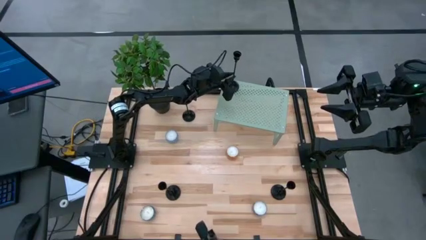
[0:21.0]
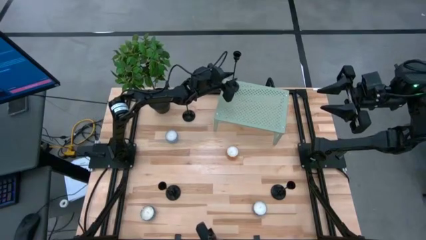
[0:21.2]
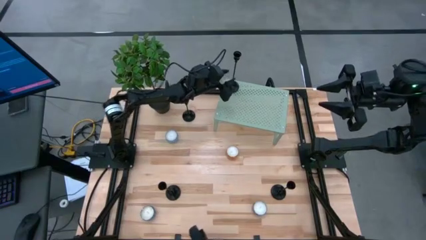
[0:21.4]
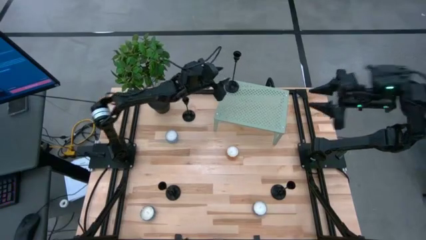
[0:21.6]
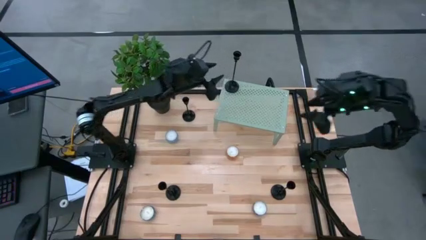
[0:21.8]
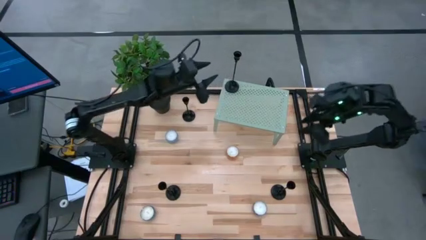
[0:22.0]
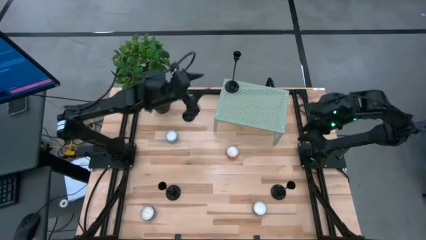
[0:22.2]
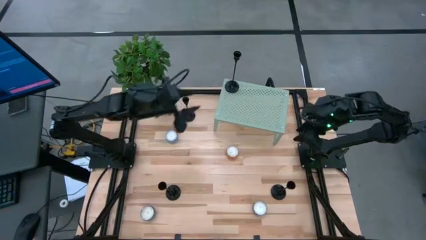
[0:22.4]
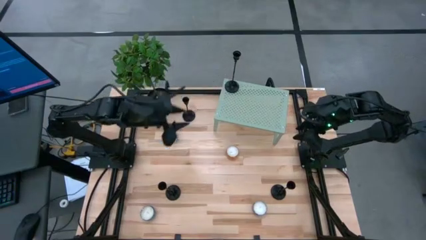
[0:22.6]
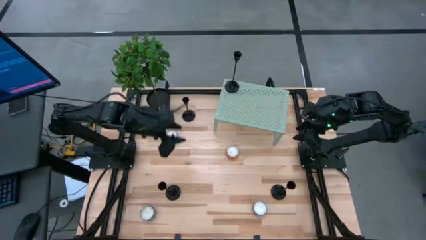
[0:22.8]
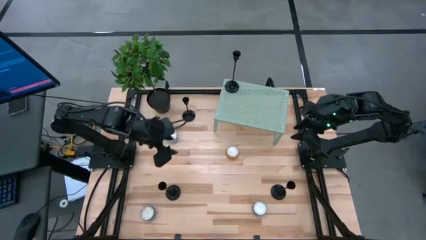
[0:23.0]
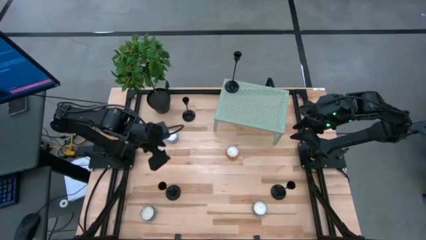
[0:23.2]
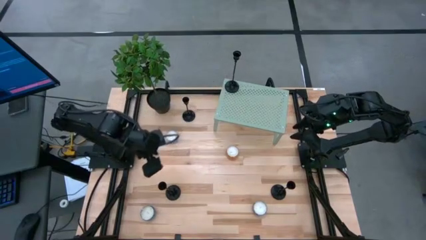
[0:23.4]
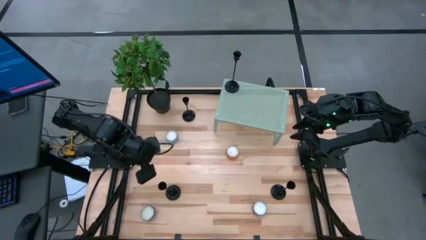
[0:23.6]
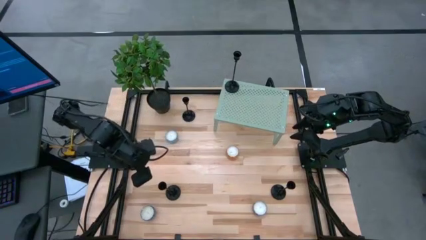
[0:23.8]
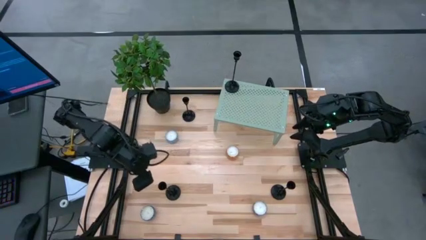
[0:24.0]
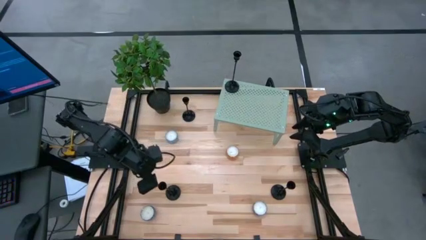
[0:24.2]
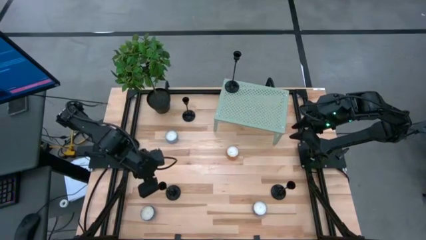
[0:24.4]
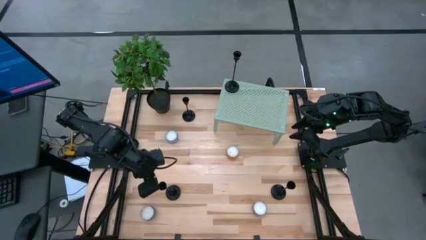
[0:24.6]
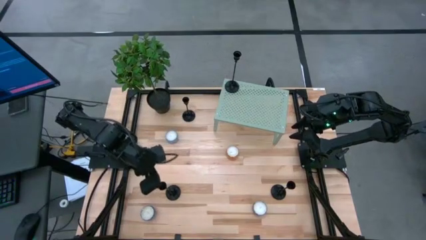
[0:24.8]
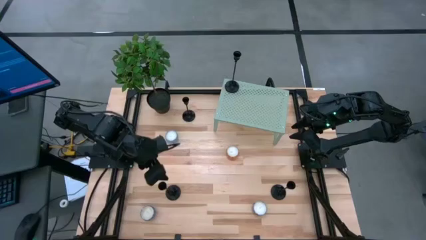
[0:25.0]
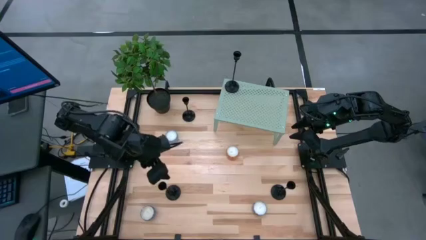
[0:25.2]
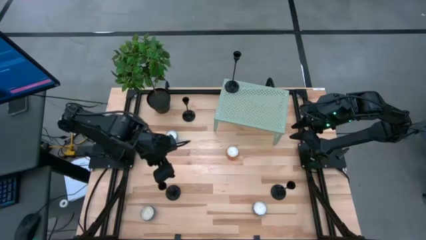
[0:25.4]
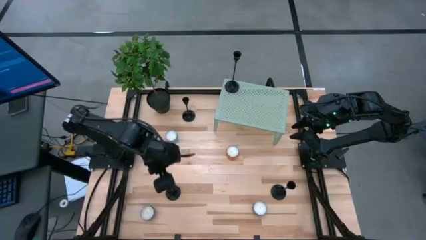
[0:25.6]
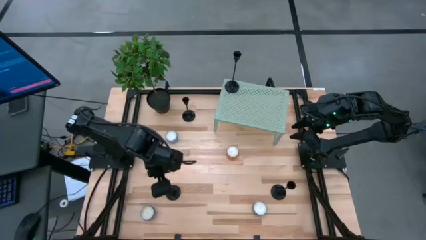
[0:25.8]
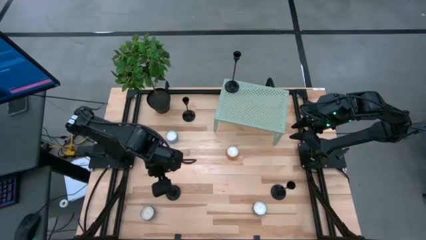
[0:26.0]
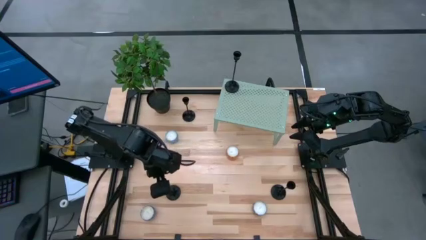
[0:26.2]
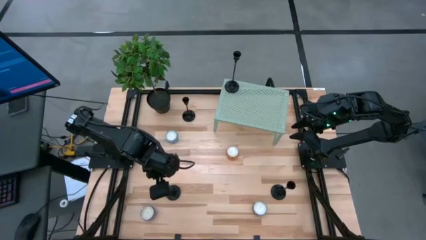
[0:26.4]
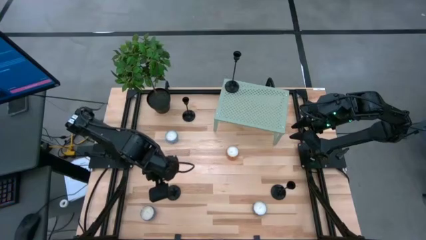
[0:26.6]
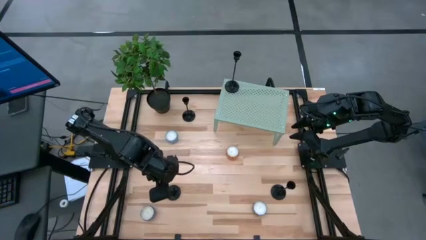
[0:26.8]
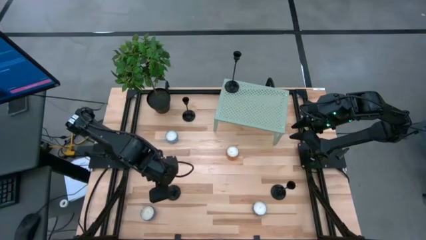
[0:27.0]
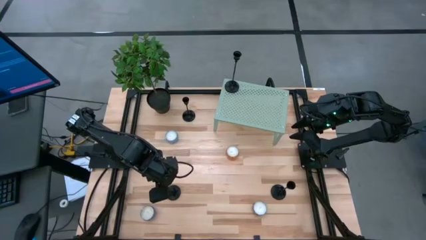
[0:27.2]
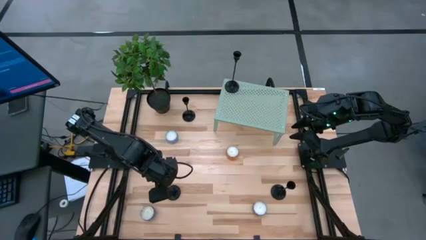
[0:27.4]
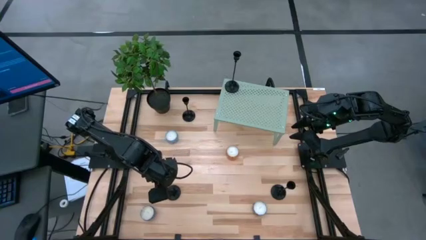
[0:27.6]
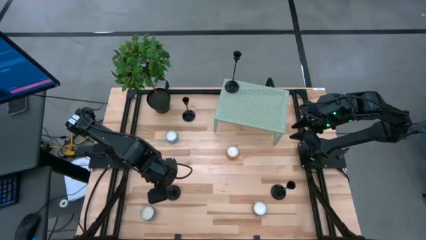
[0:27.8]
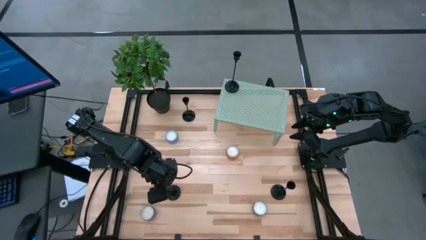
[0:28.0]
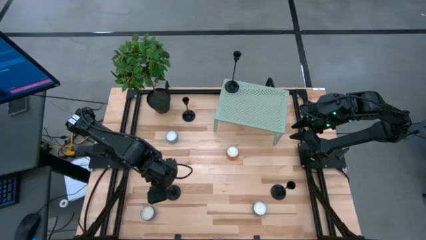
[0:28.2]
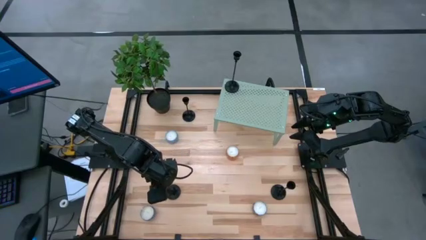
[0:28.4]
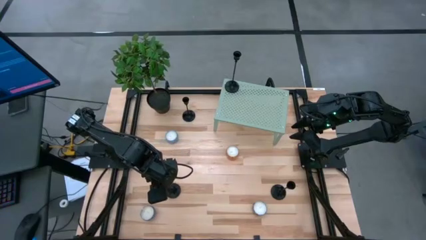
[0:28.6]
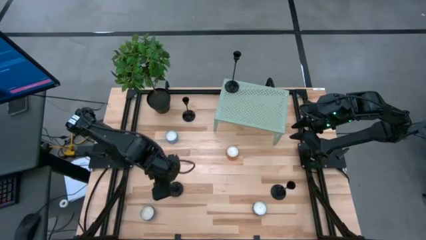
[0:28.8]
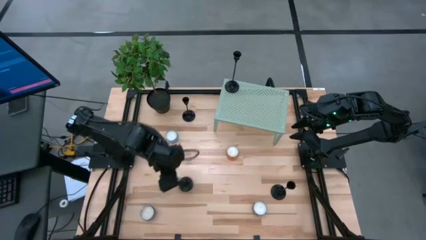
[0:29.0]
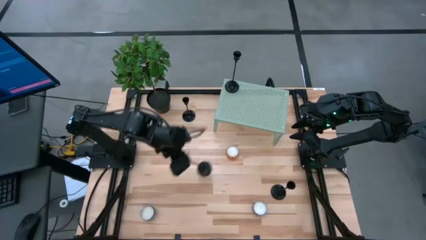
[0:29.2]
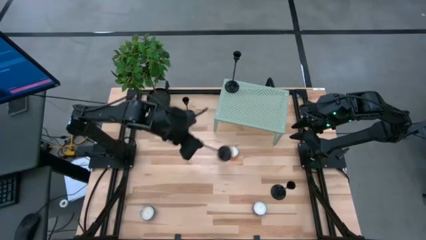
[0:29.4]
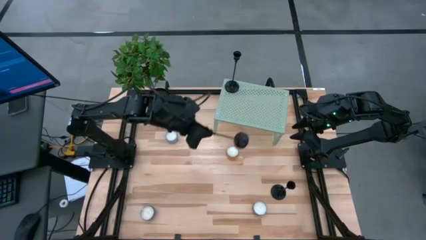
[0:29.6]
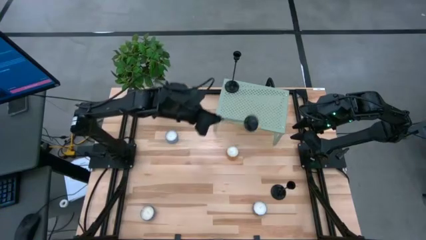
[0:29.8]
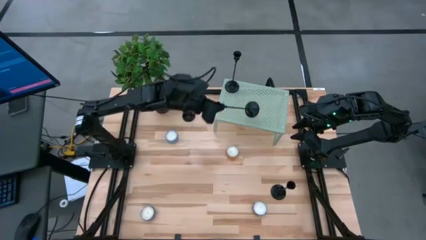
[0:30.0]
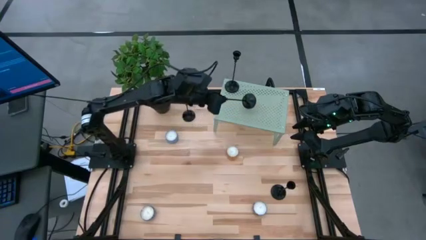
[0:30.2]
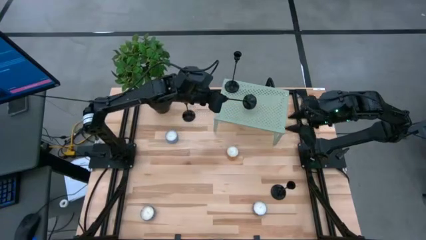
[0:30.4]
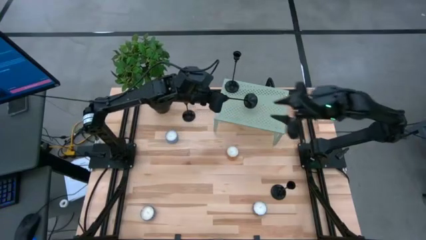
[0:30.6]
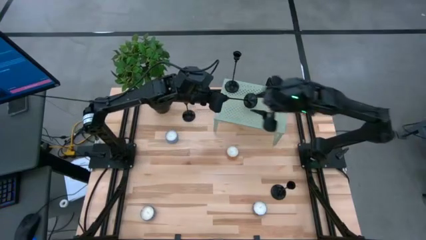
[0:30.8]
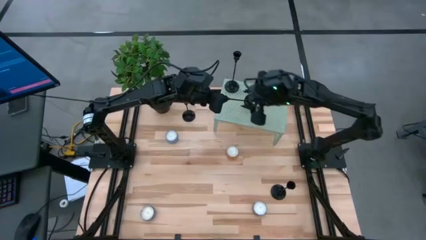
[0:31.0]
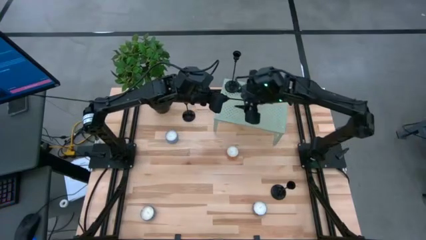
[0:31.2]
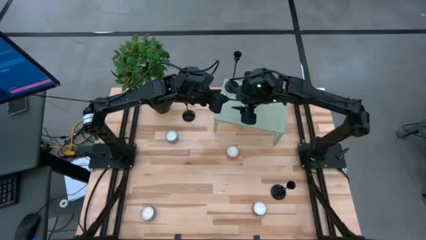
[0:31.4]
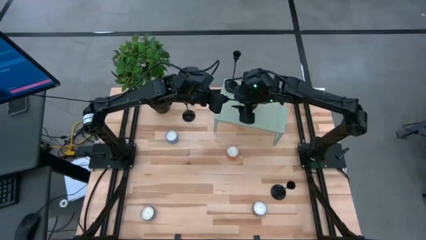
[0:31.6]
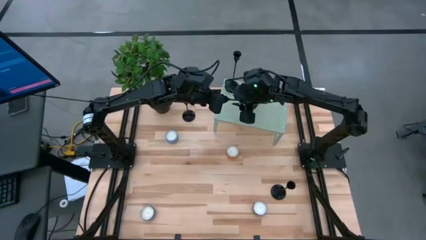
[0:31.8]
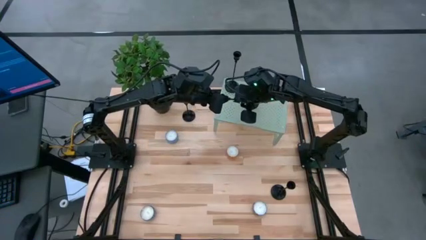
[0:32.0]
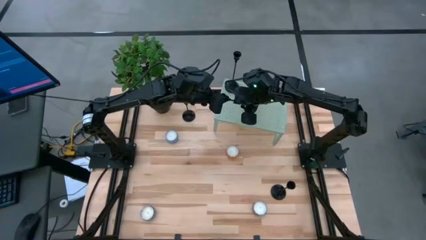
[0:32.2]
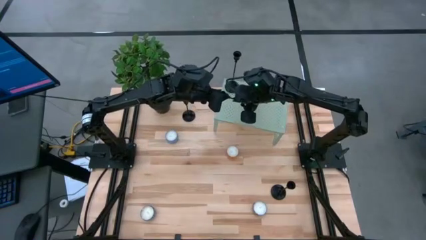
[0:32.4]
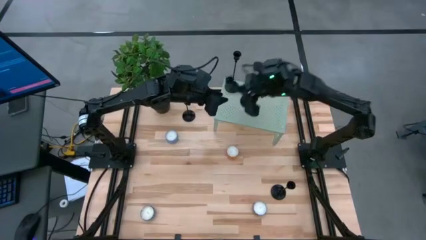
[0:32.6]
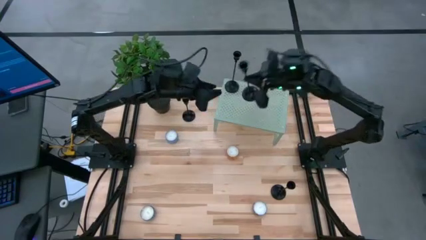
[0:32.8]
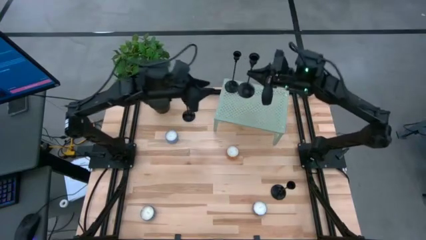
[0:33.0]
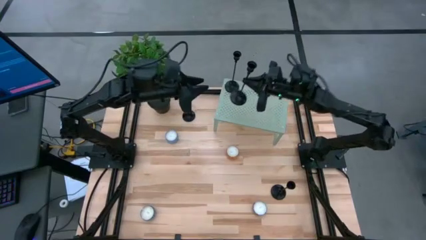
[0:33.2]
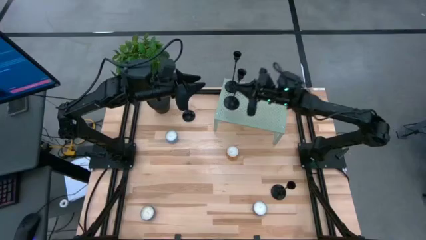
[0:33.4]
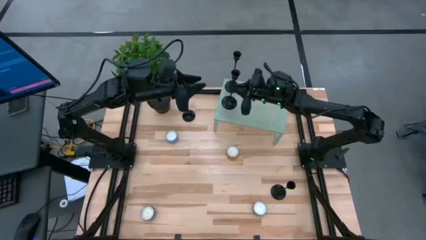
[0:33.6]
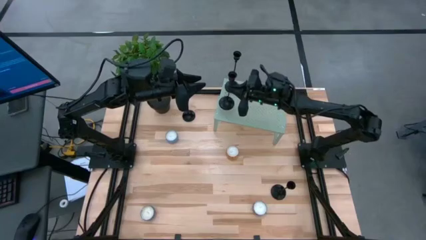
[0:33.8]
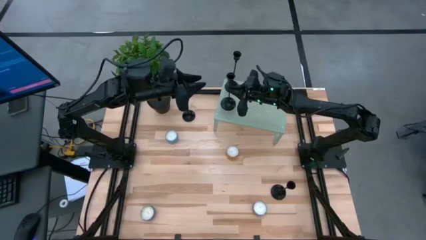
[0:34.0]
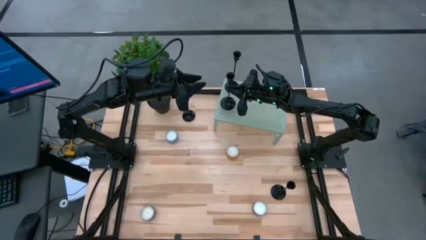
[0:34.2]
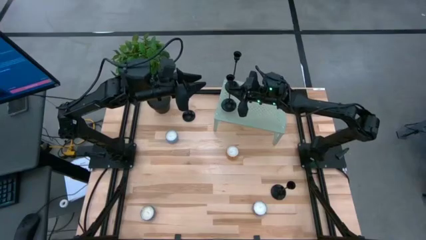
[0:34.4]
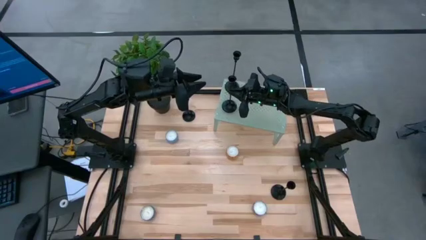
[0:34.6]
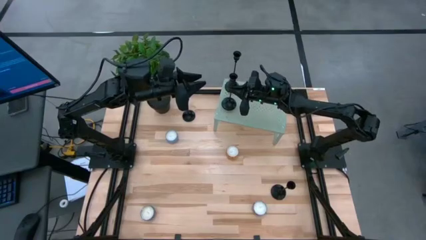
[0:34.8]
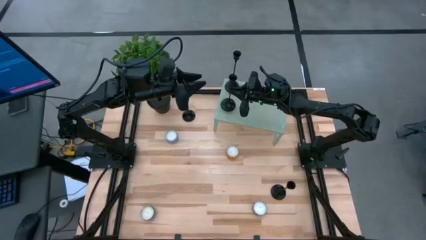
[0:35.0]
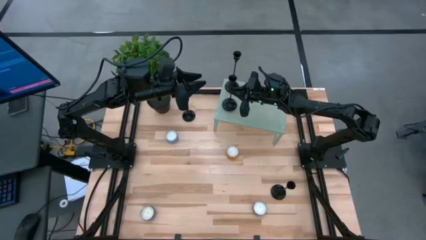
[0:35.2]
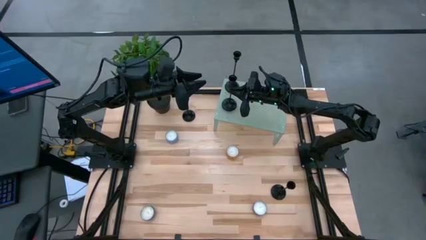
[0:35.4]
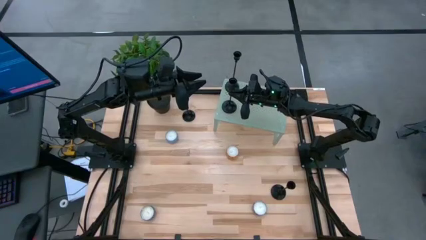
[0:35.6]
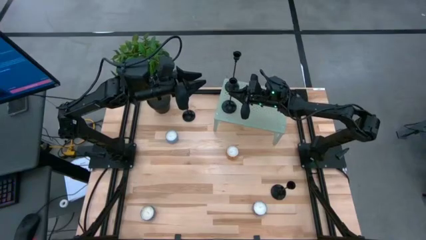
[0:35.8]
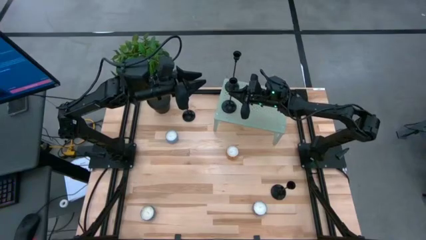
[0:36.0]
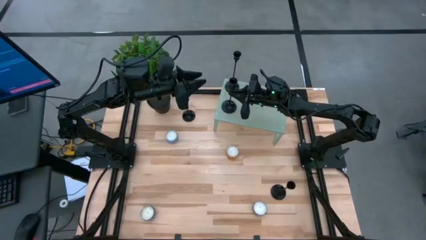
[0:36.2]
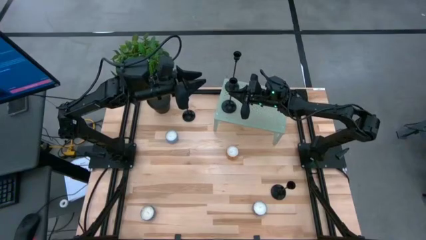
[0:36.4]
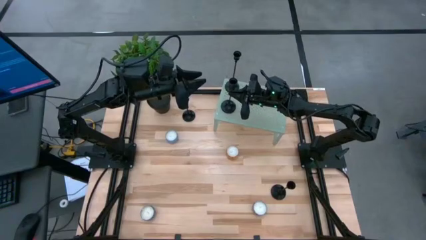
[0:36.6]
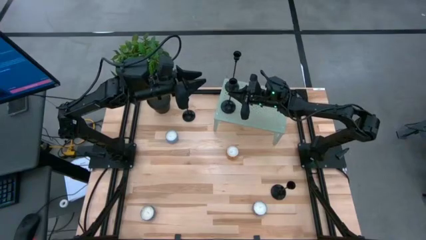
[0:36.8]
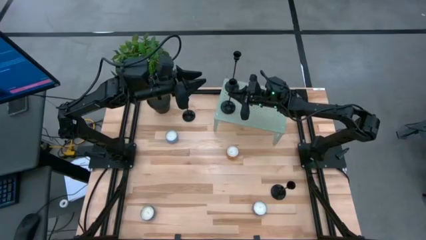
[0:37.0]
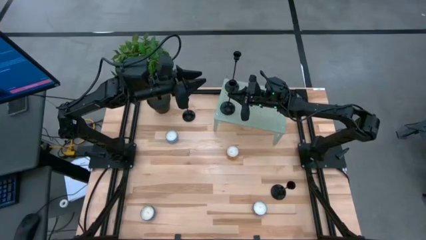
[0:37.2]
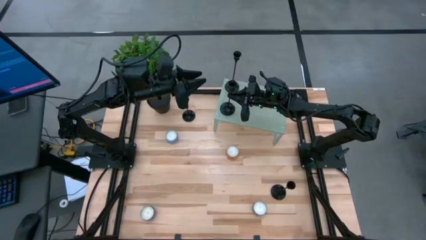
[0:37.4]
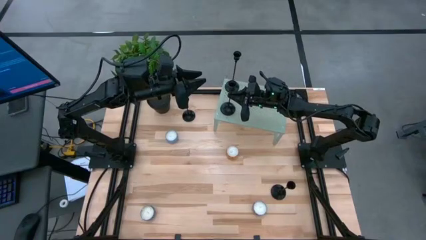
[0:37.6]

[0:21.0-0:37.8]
Task: Pick & Place candle stick holders
Put the candle holder on the shelf aligned with the other candle holder
